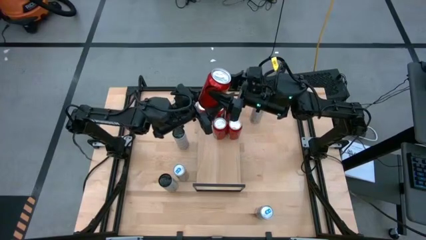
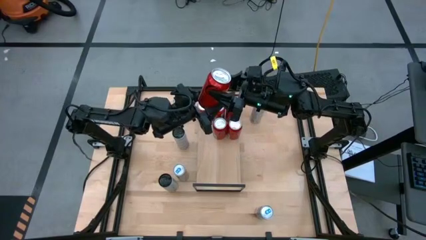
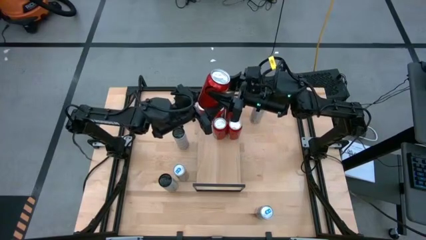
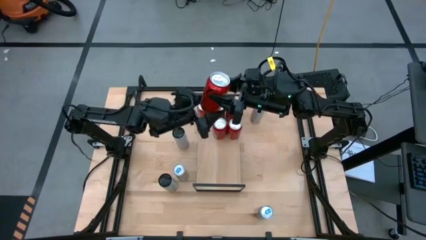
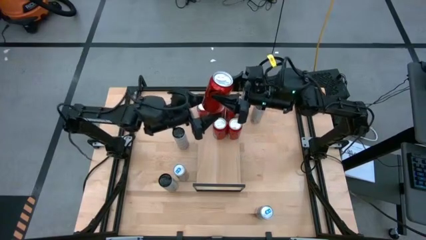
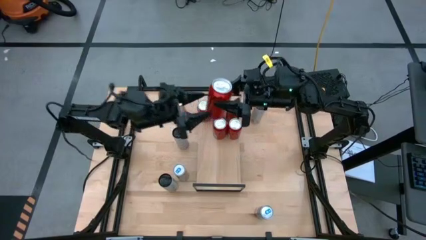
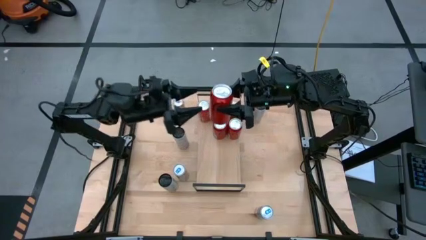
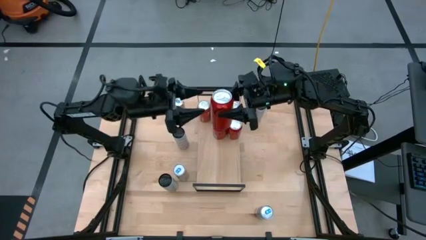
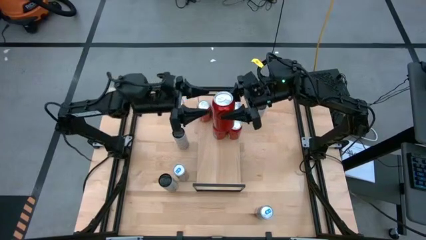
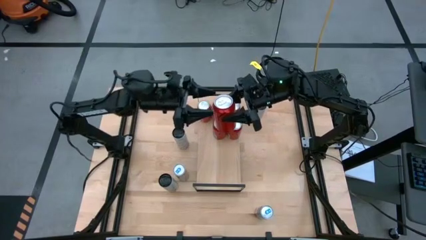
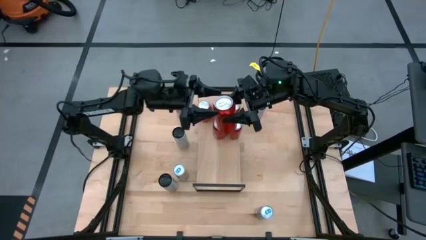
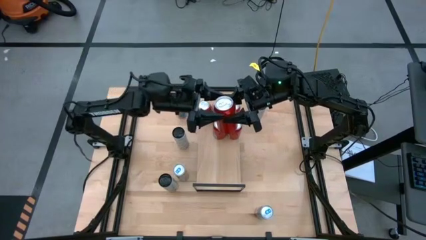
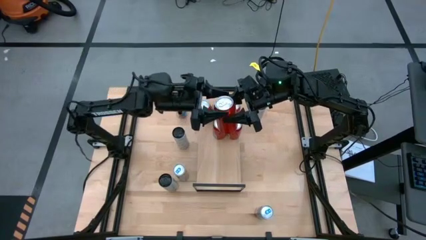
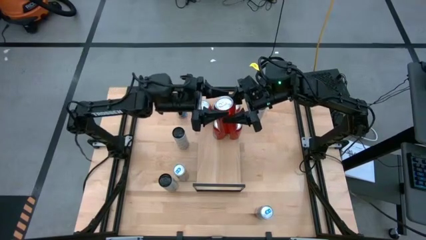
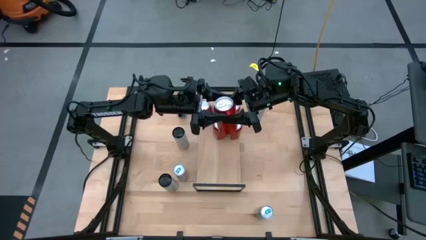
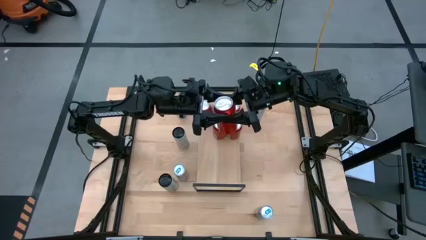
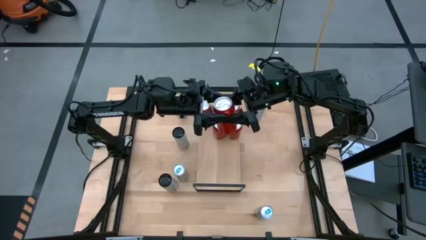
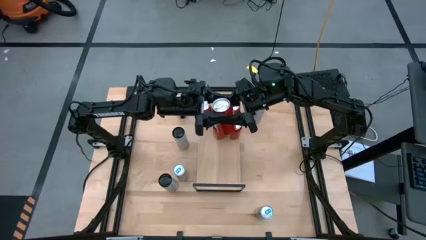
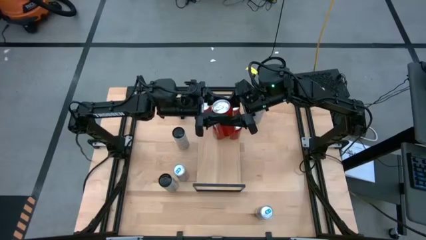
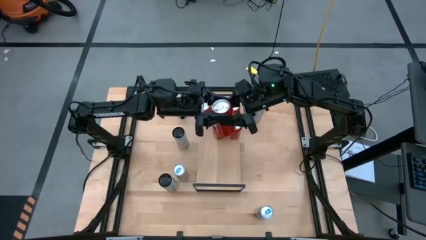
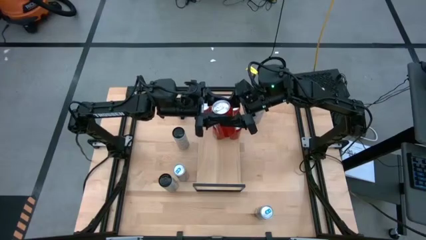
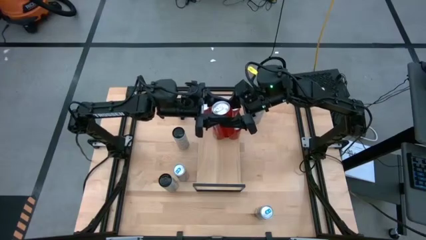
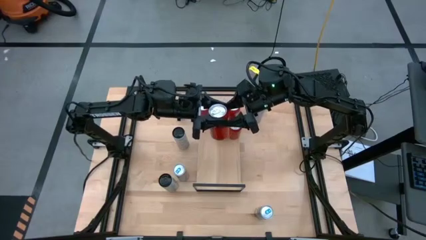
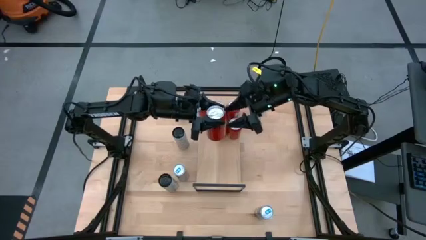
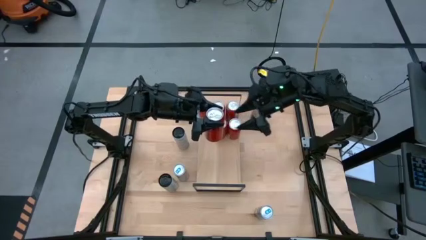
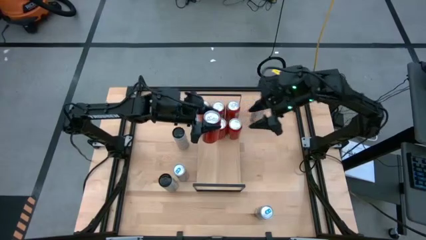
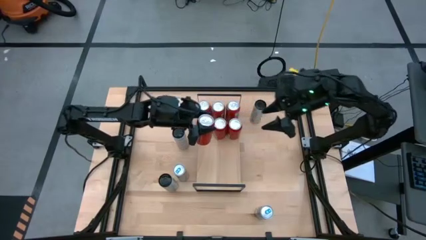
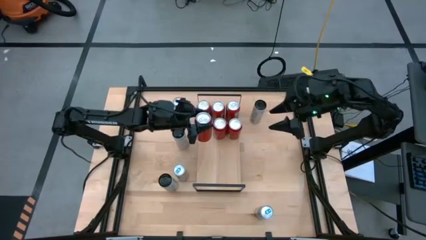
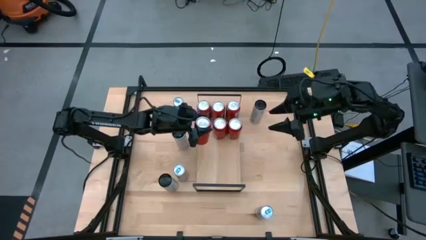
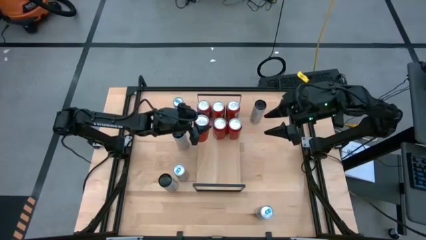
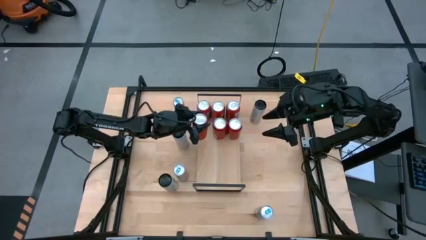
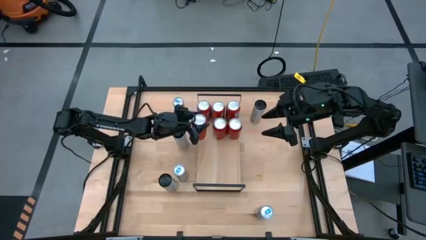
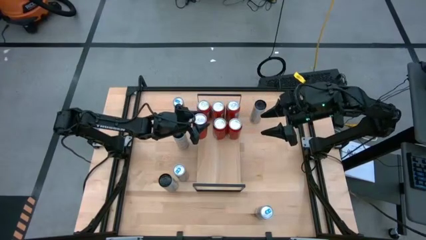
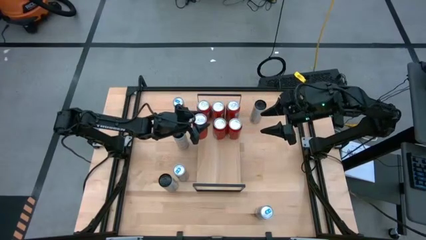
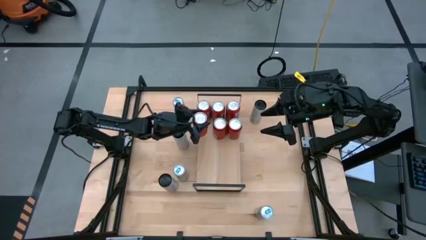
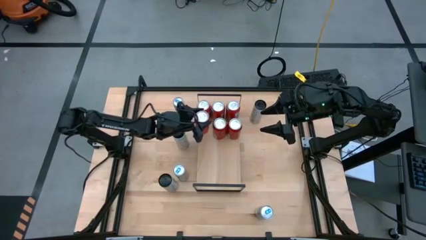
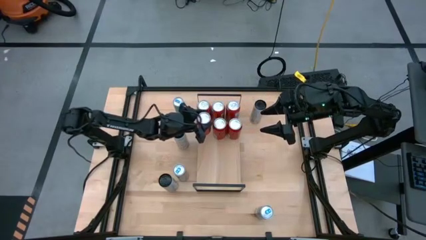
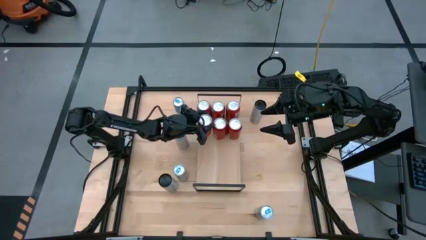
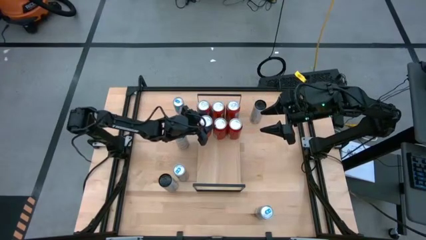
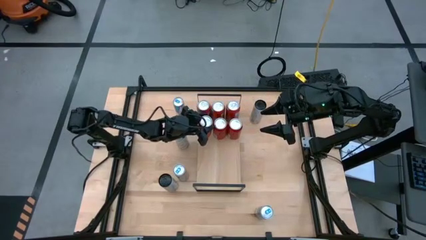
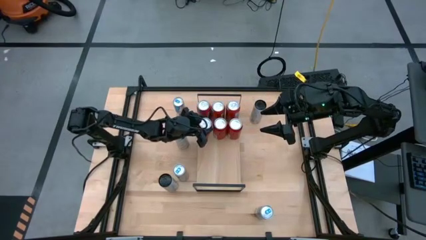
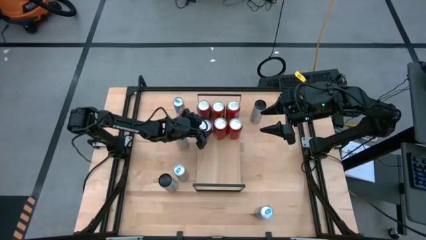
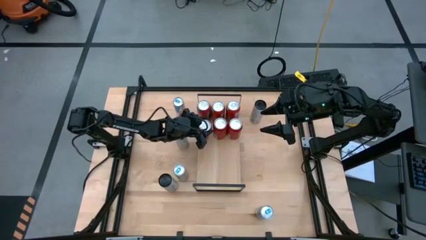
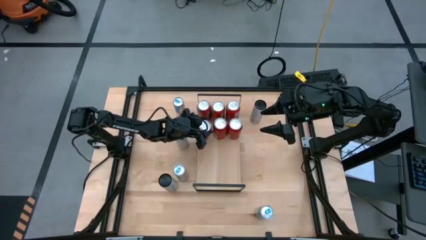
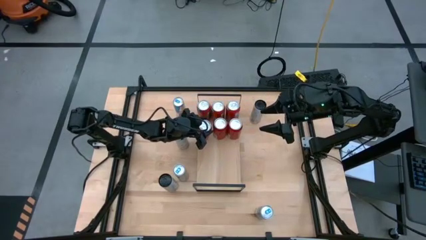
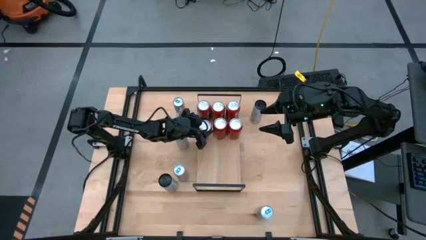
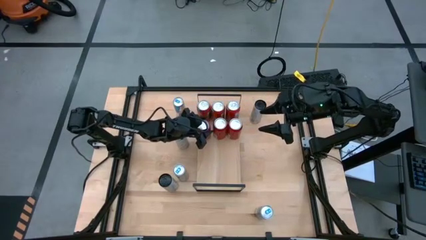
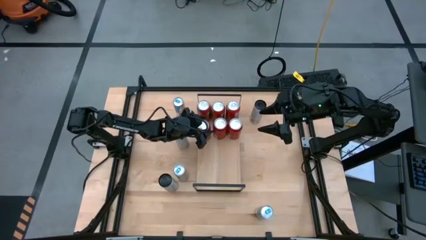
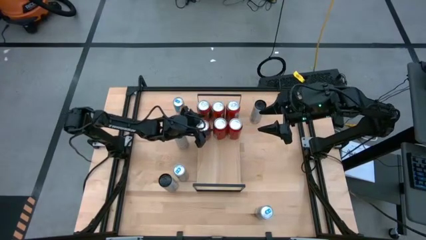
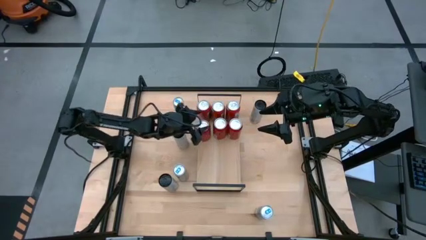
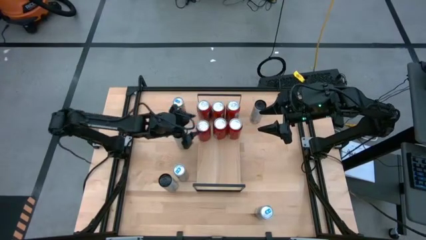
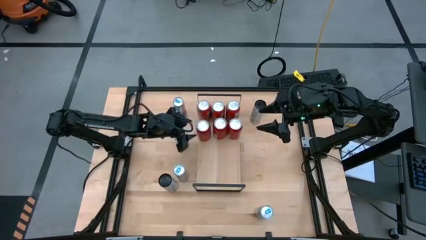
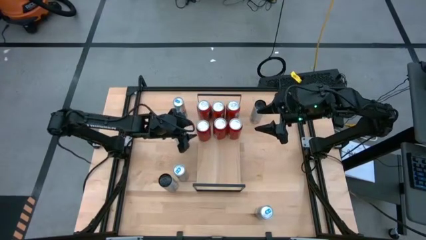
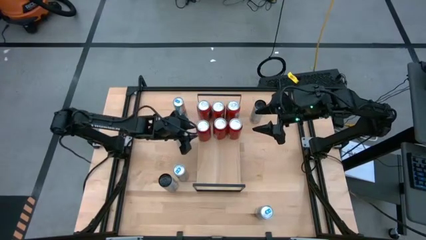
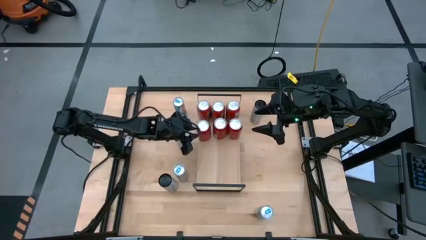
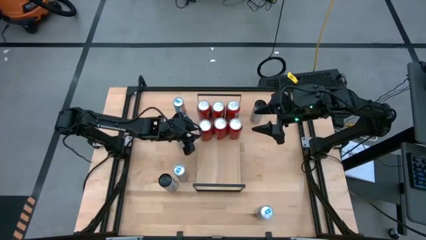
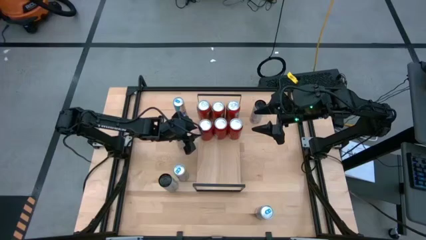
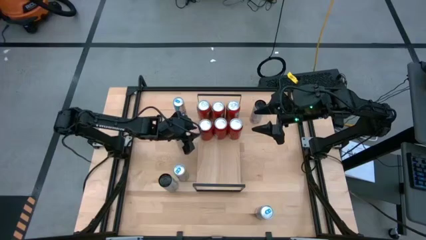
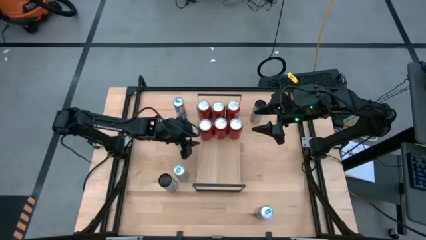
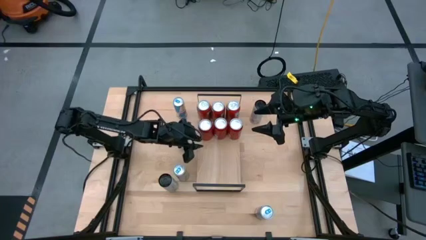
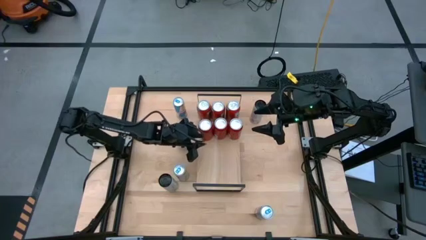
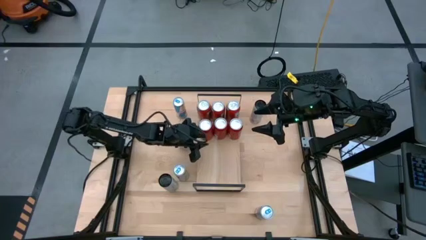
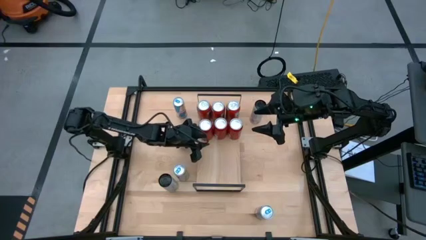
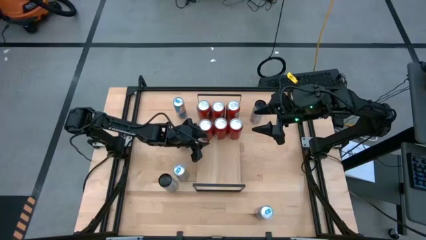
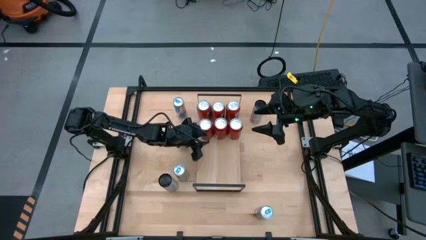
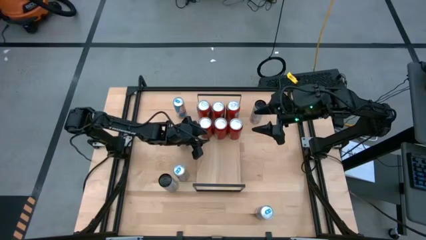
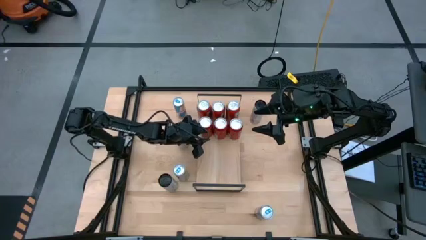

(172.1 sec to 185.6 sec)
Task: Place canned beverage on shelf
Put the red soda can on the shelf aligned with the other red soda can

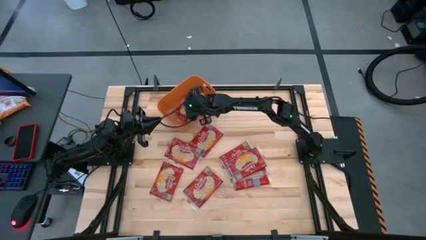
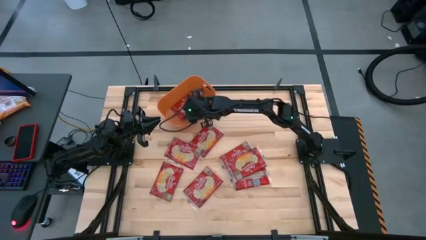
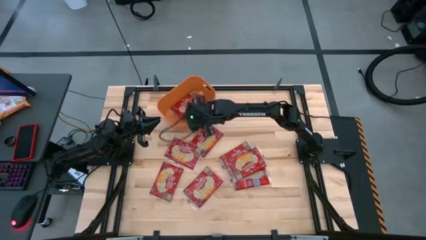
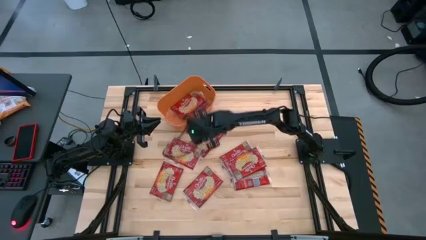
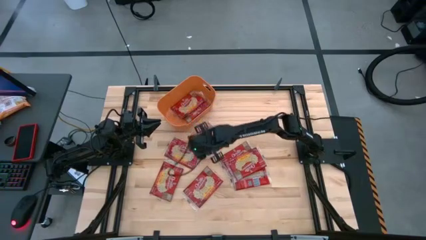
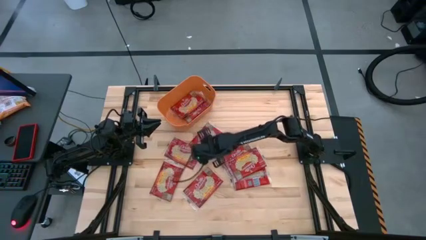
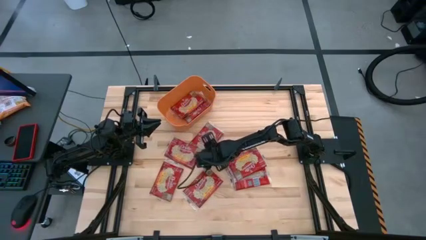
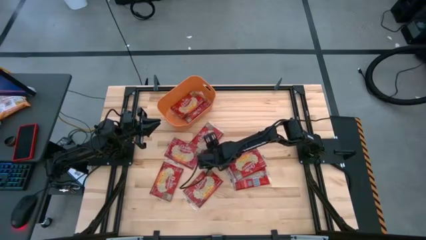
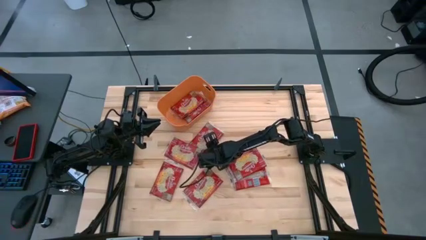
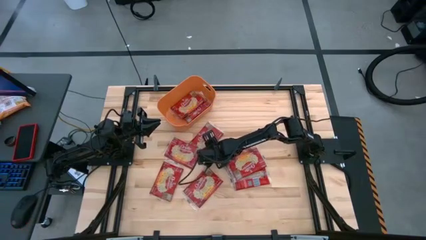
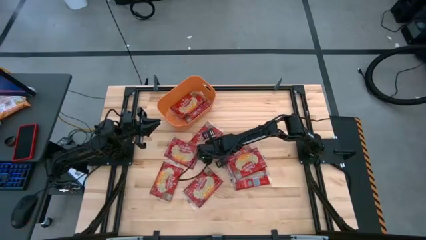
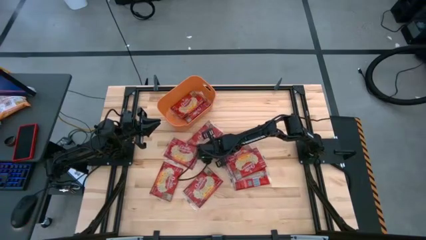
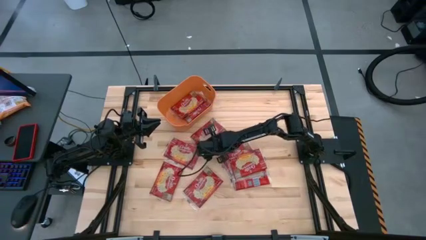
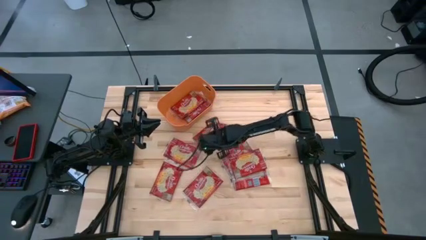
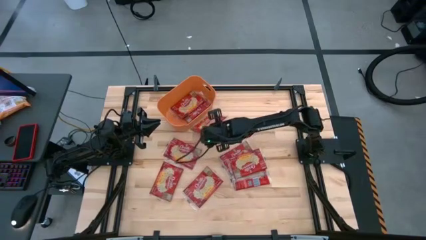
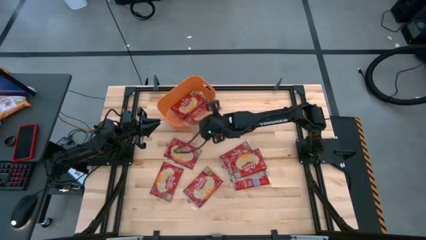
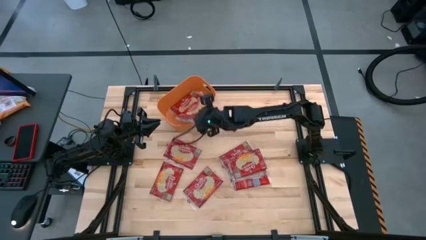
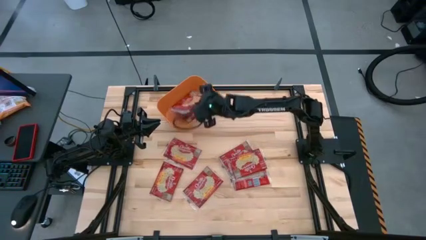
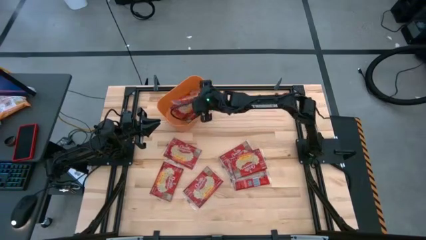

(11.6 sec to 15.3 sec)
Task: Sort popcorn bags into baskets
Put the red popcorn bag into the orange bin
